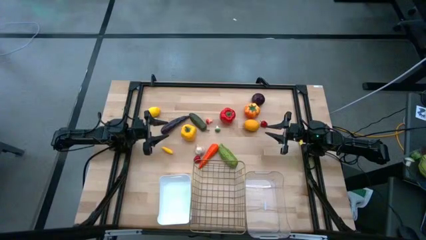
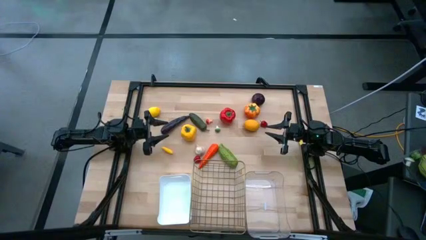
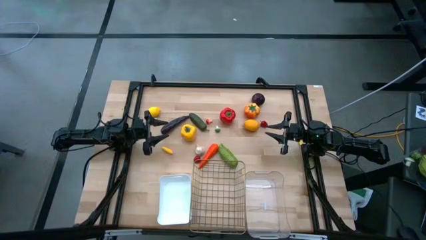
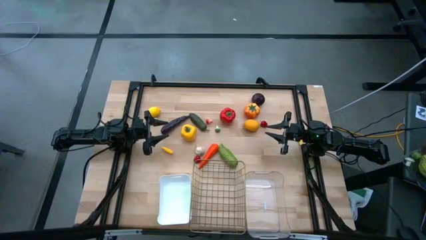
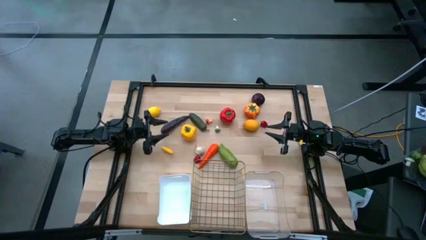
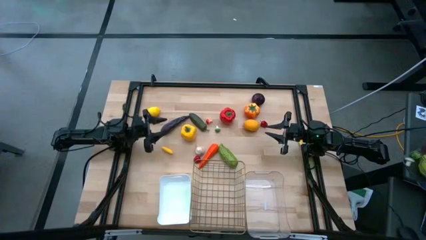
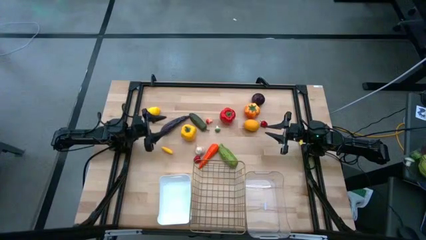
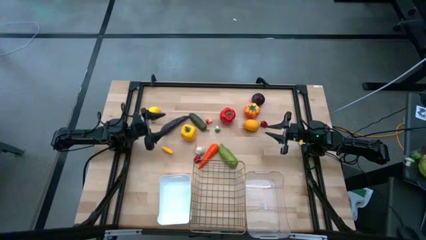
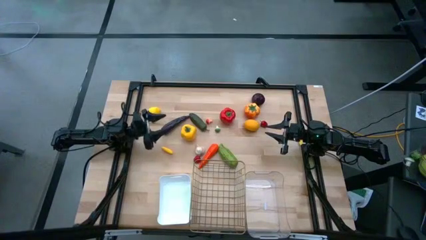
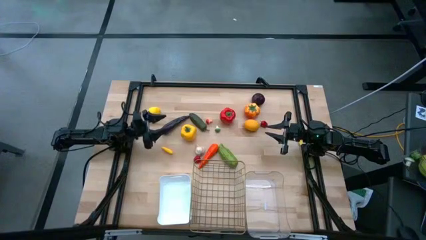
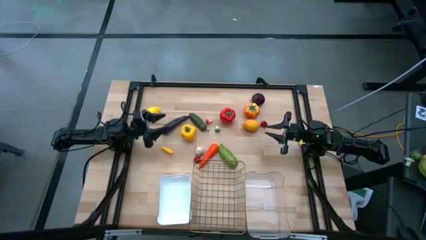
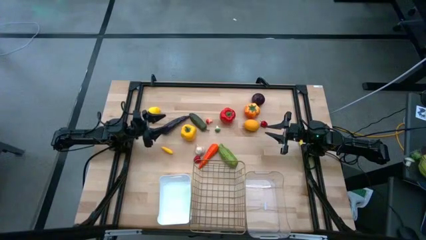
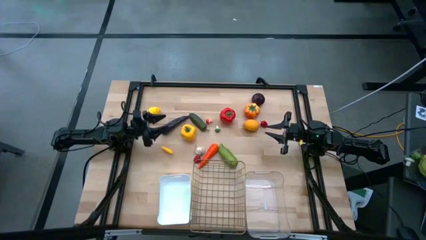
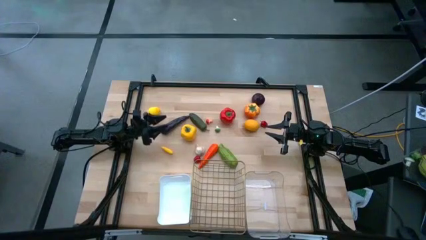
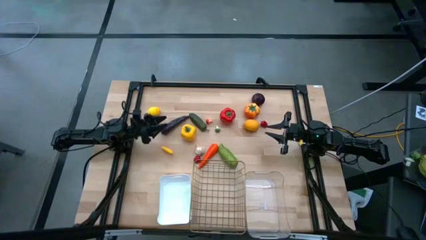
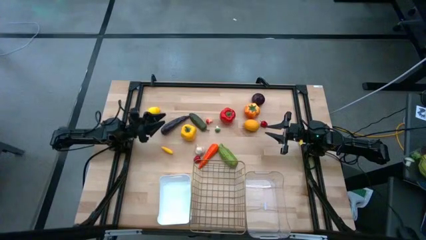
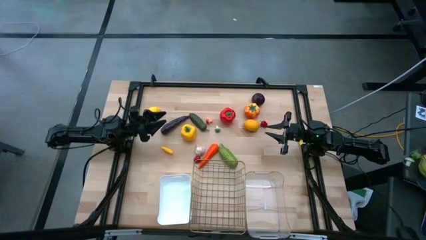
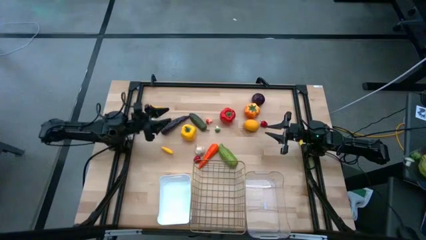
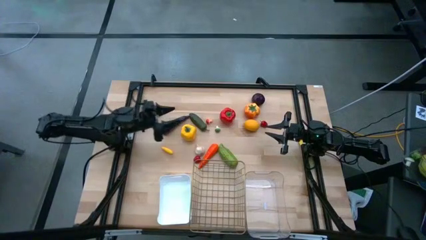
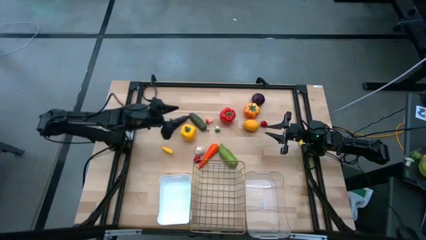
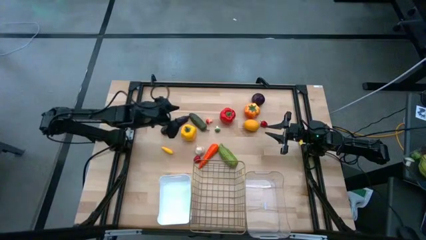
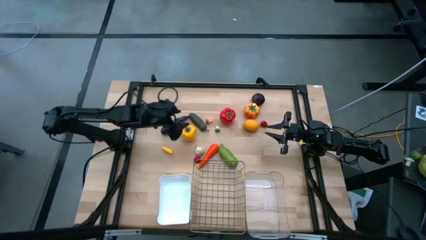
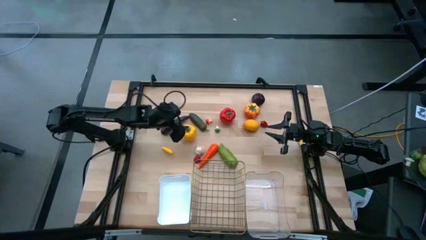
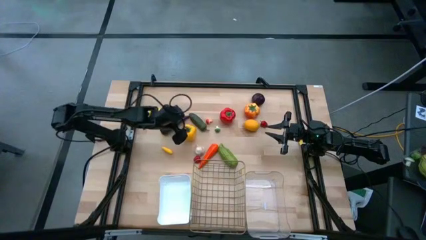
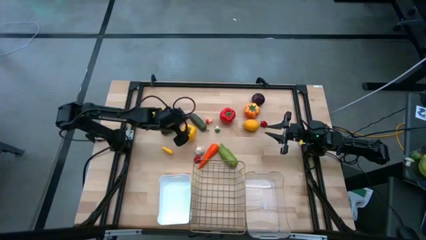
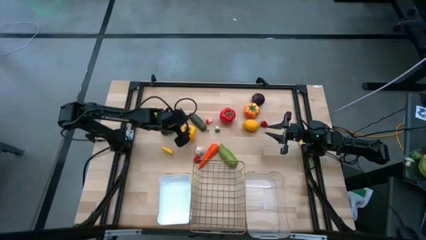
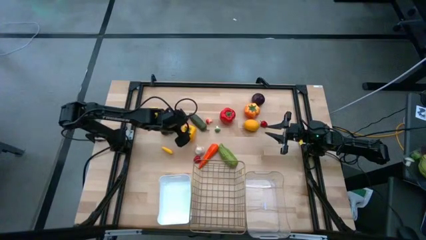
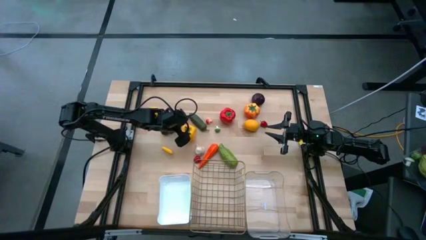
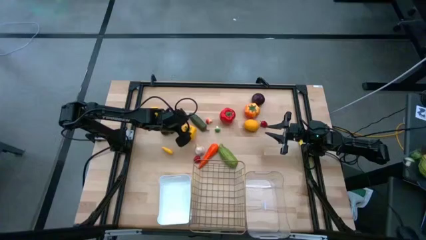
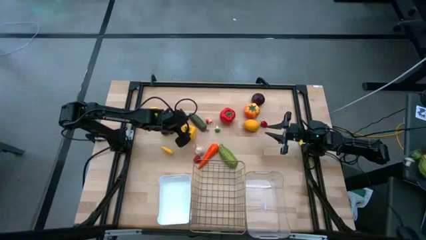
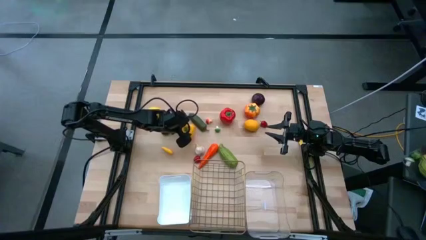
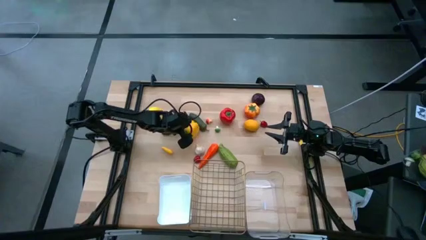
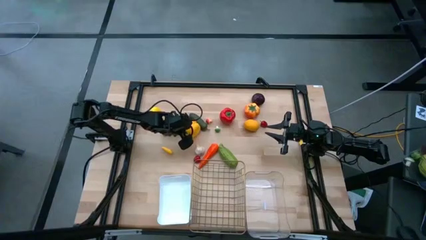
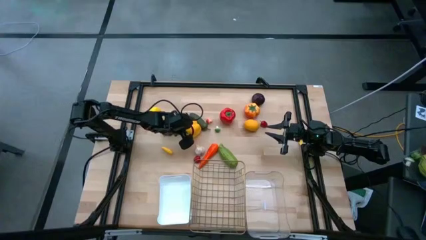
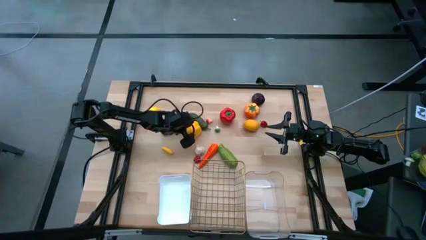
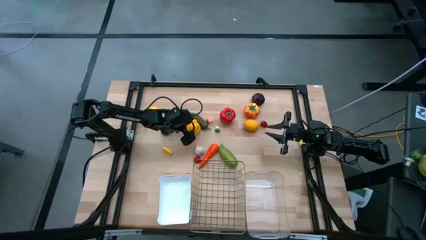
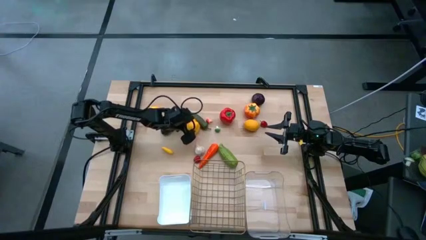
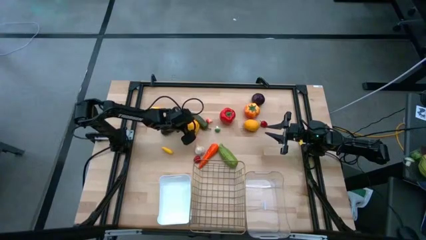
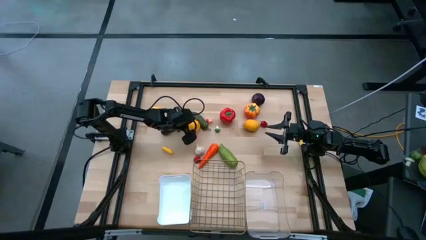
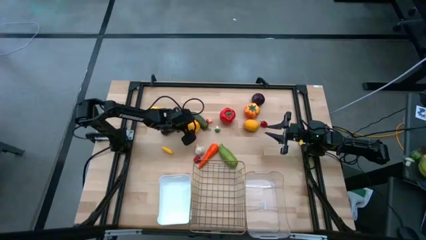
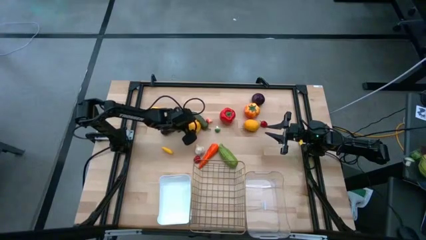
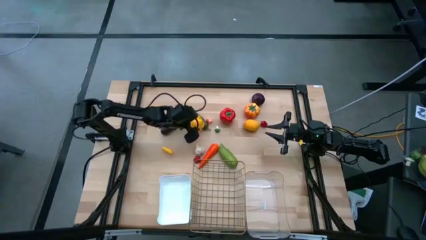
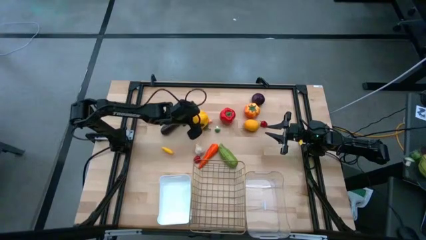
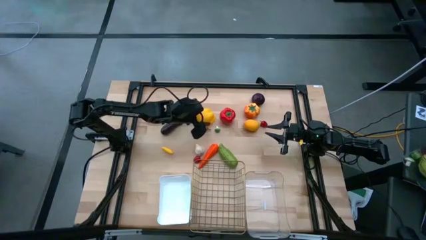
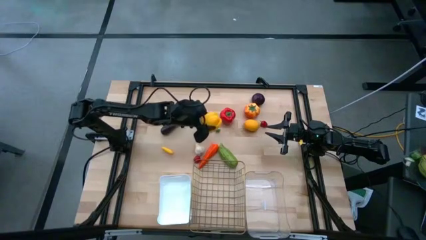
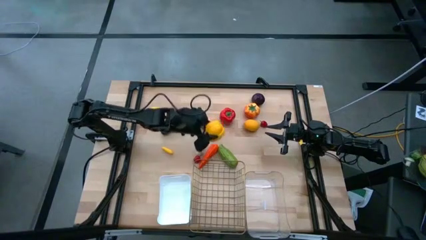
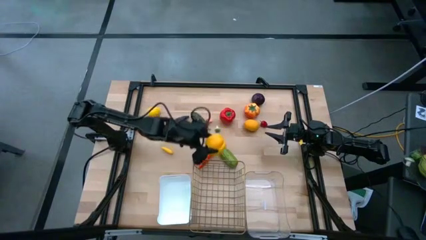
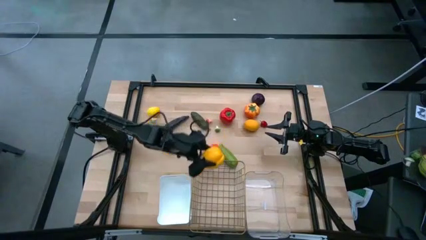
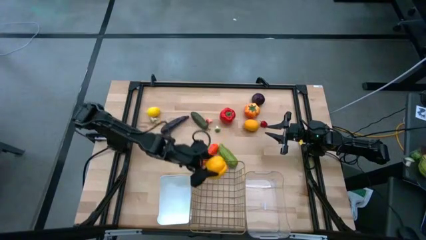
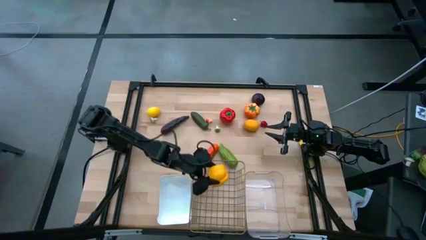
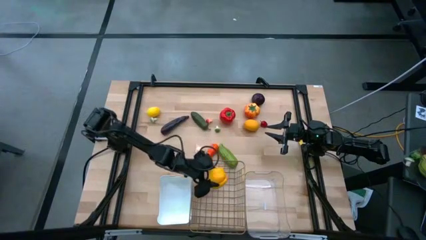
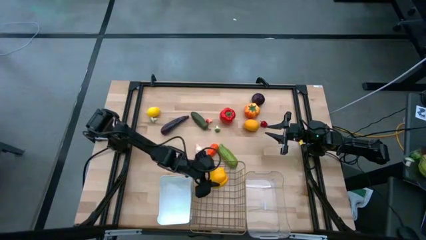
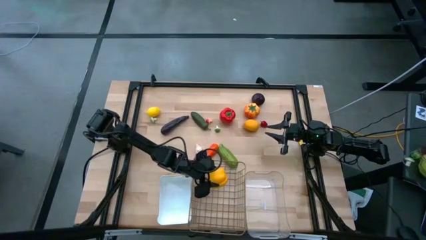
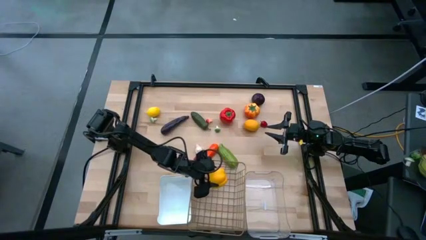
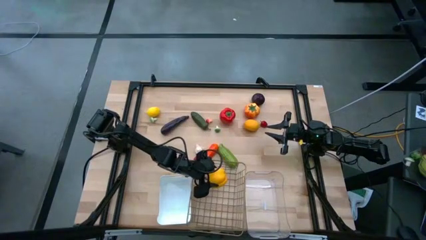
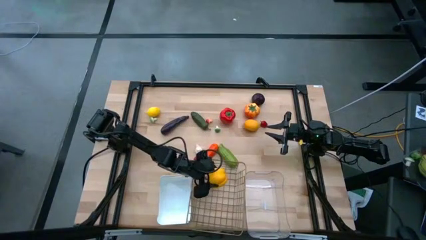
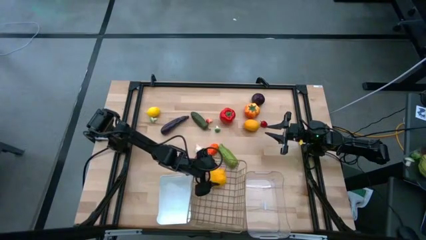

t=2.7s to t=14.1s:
Task: Sort produce into baskets
Put the yellow bell pepper into the wire basket

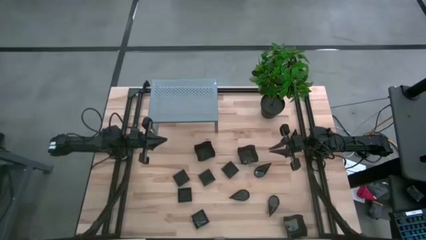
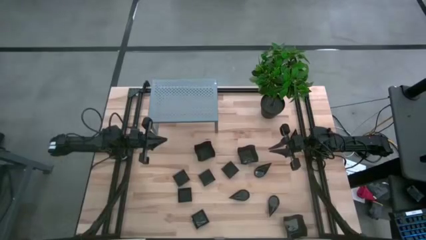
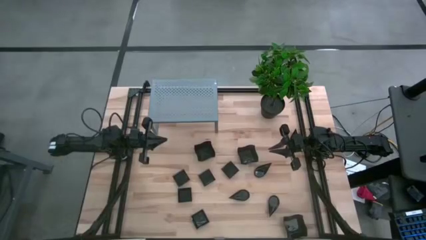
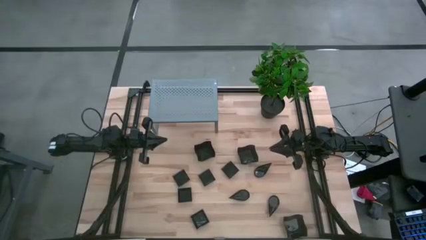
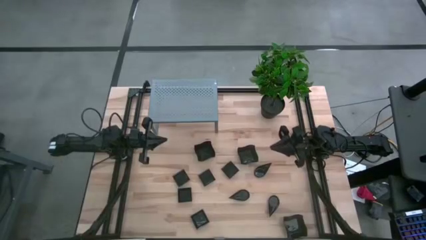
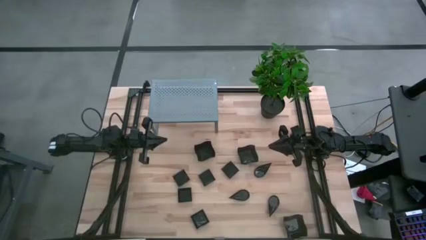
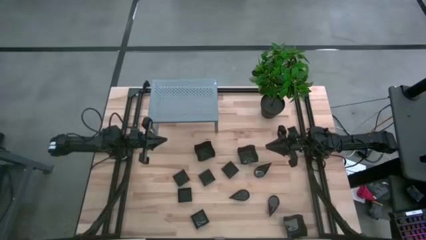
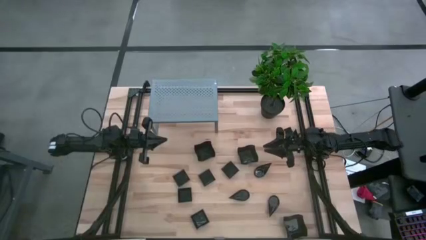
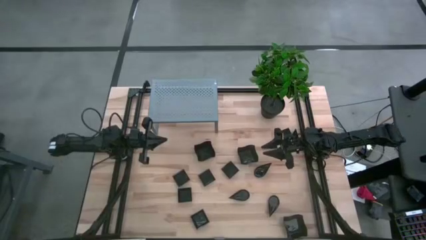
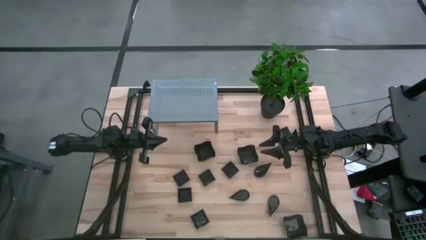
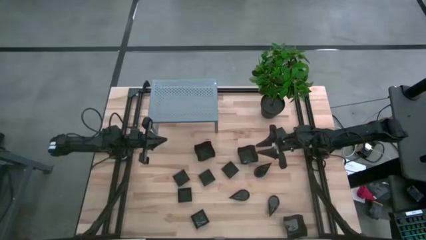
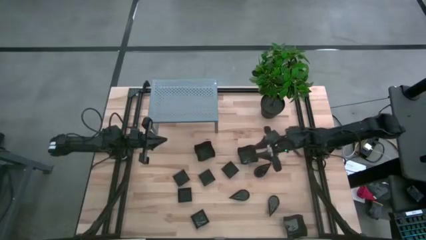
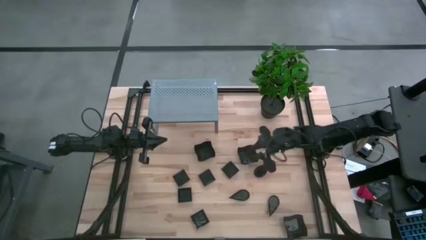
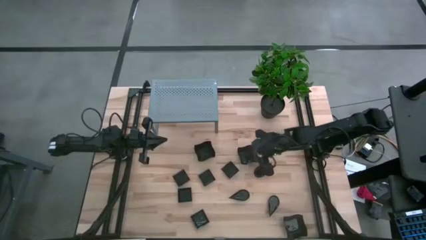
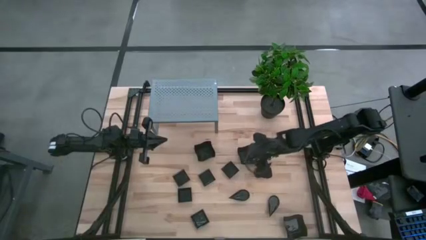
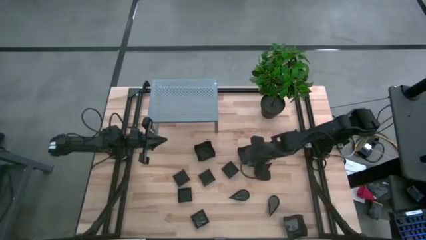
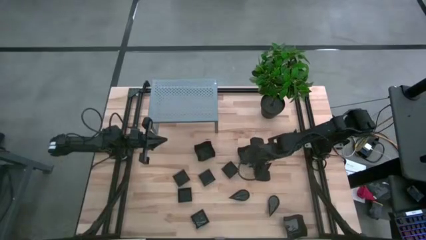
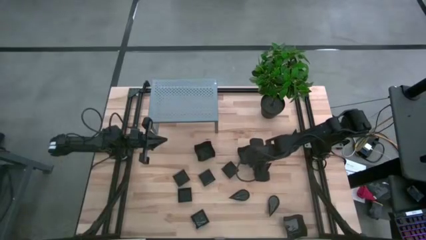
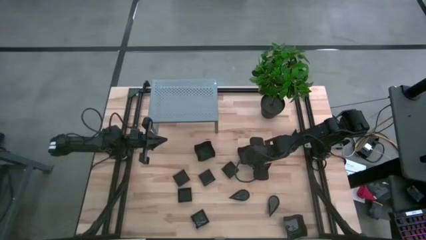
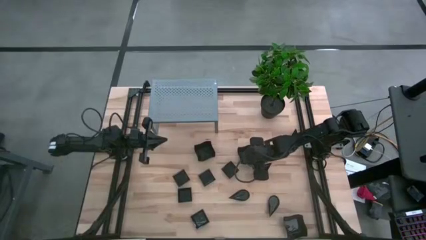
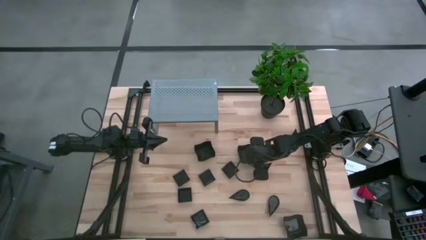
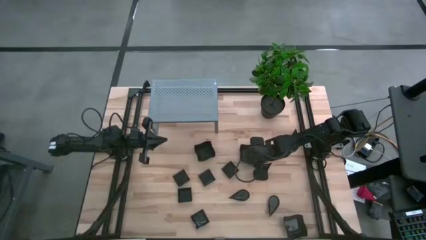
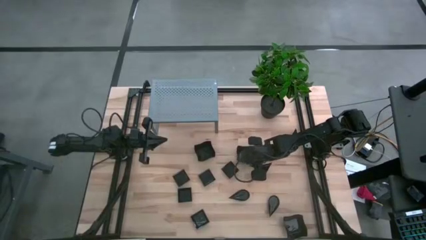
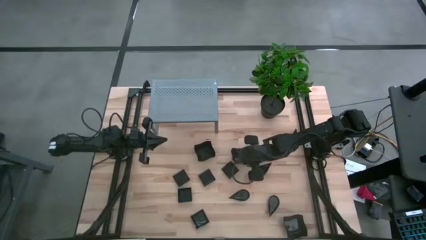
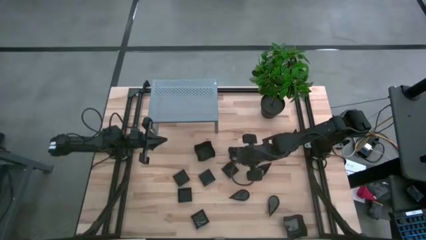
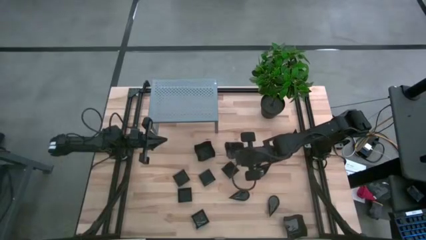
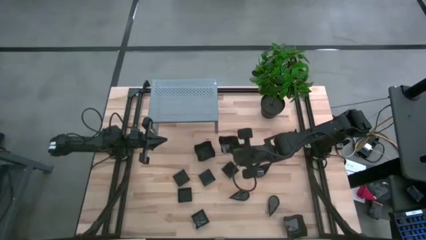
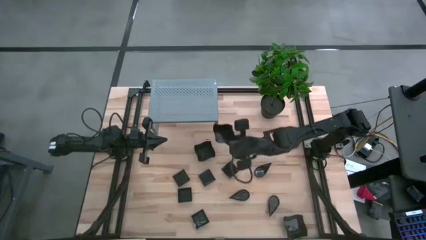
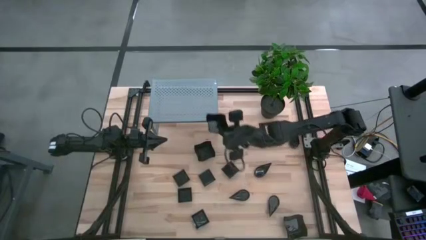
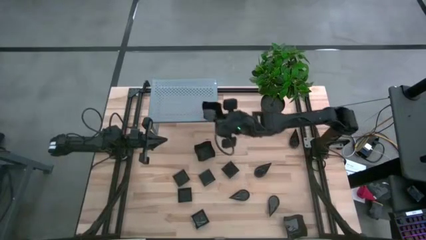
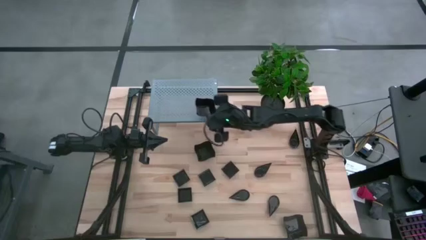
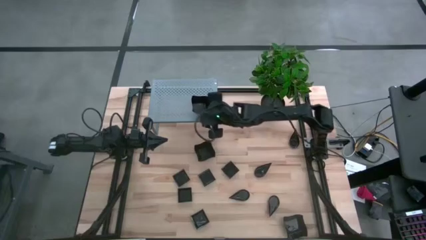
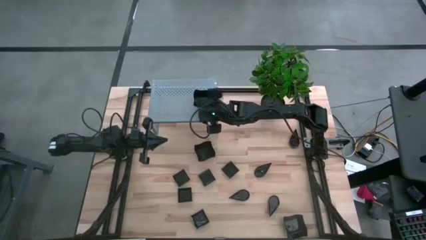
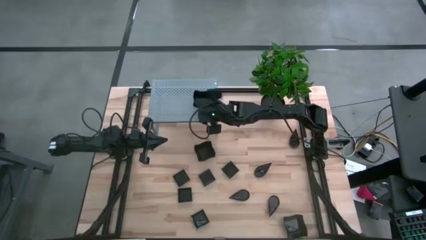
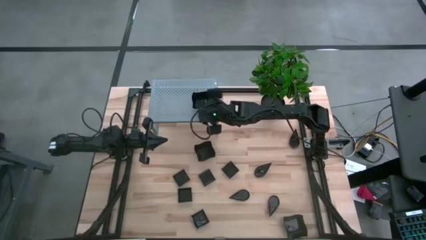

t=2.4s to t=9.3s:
Task: Pick & Place Mini shaped plates
Put the distorted square plate on the shelf
